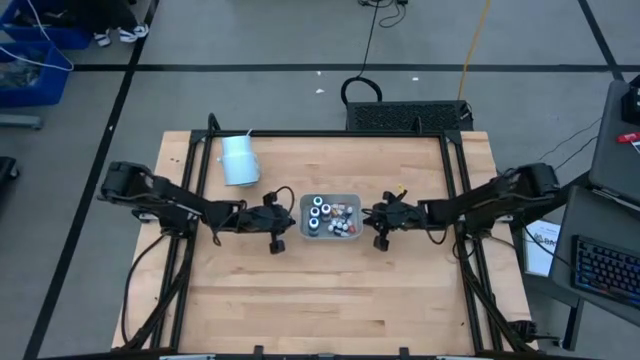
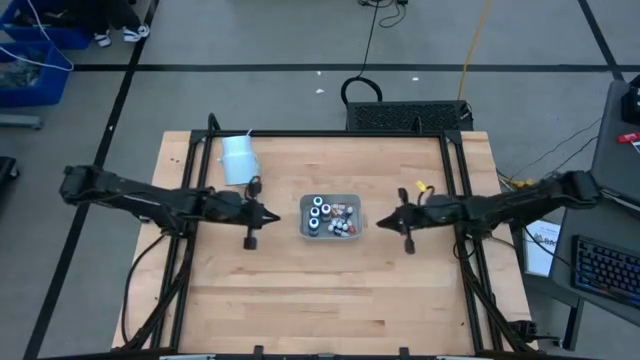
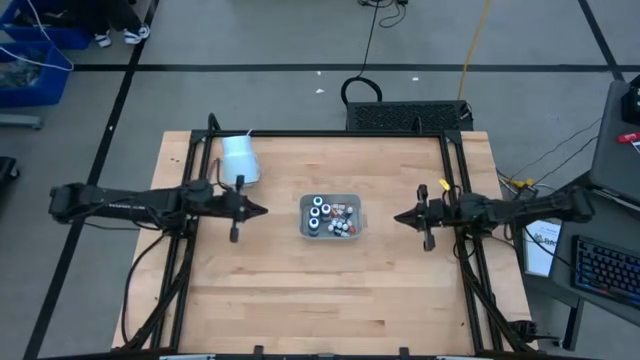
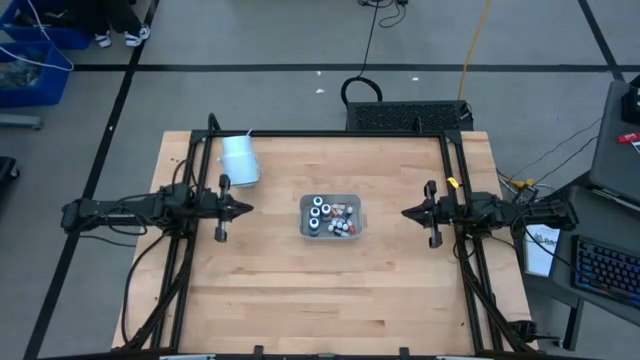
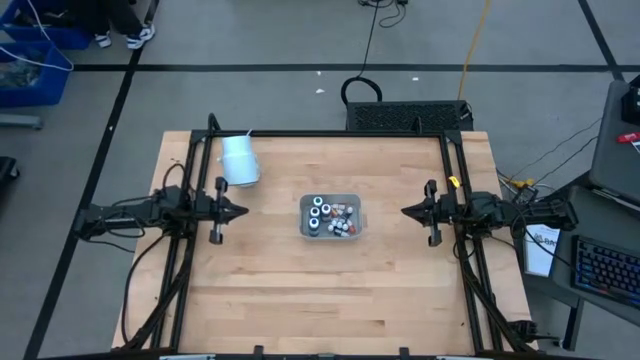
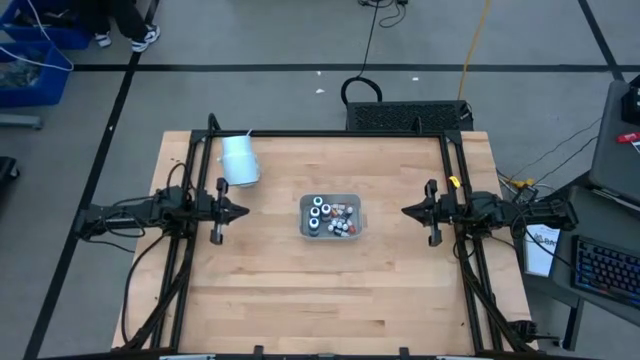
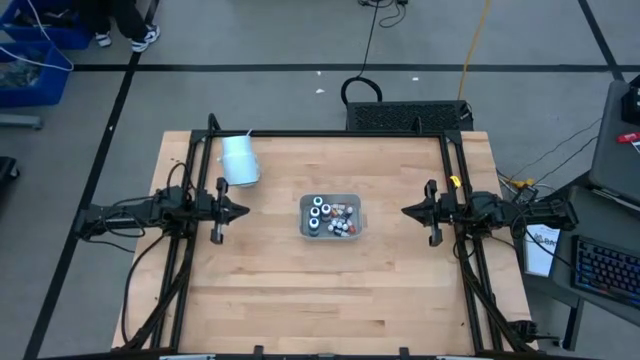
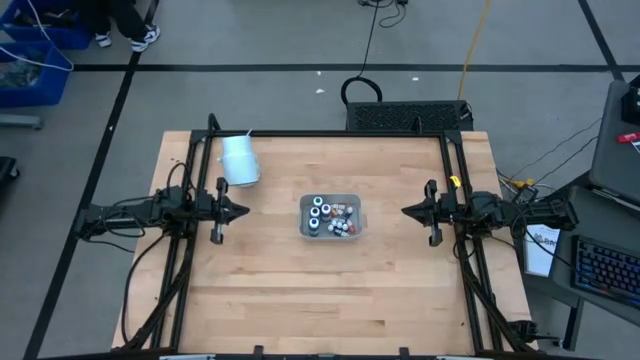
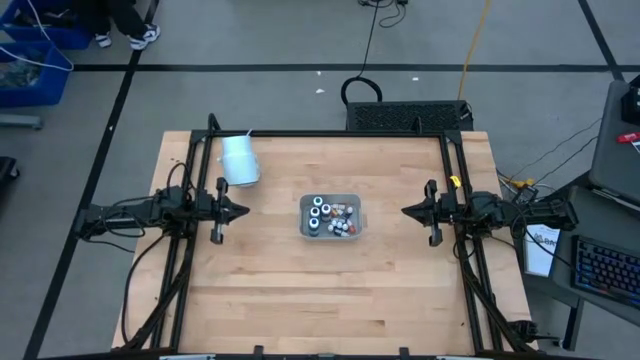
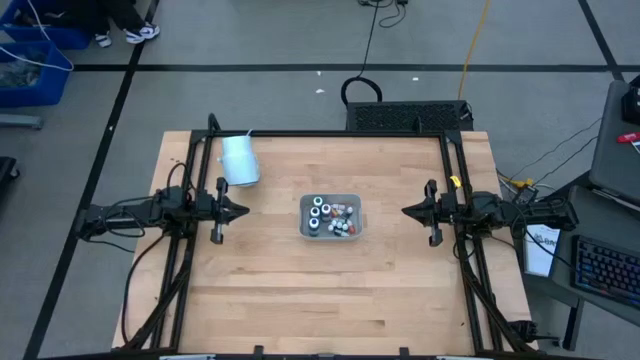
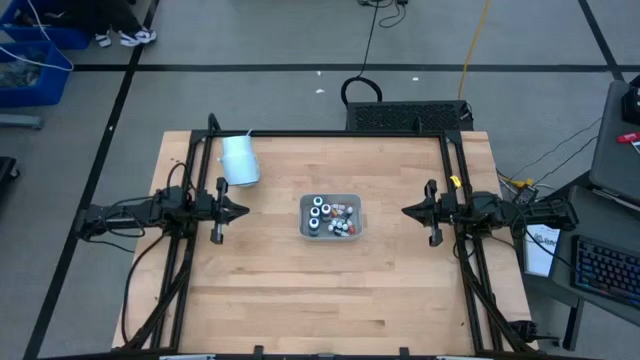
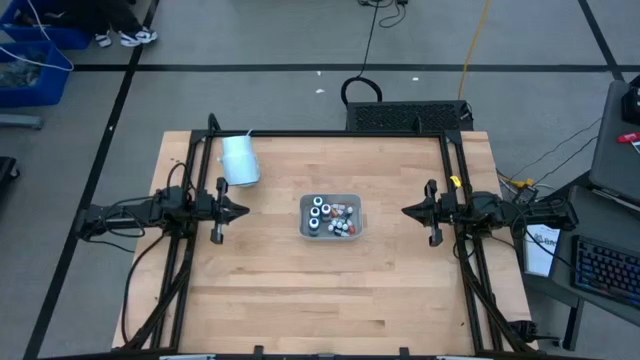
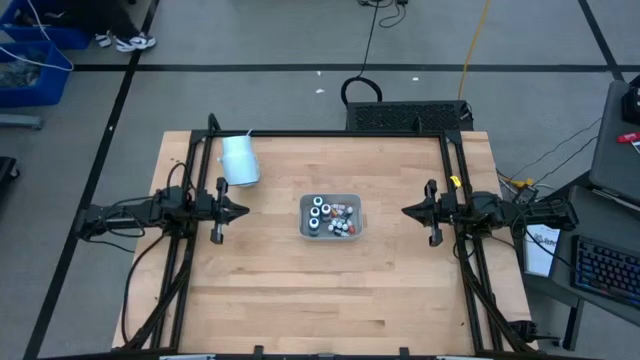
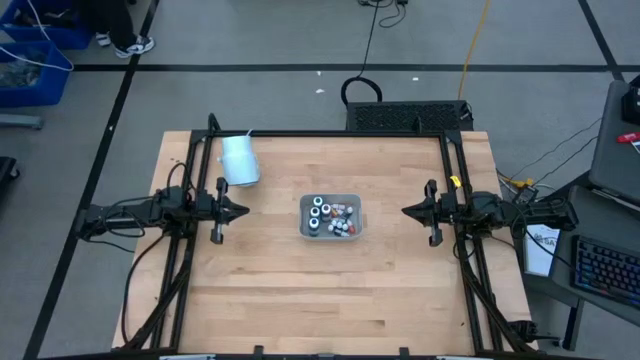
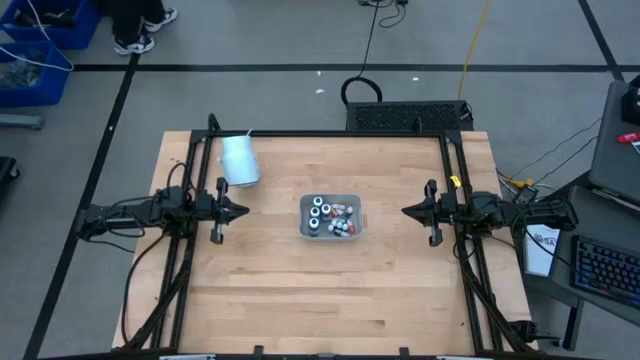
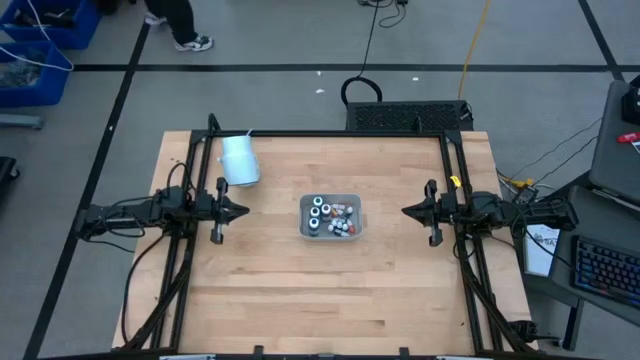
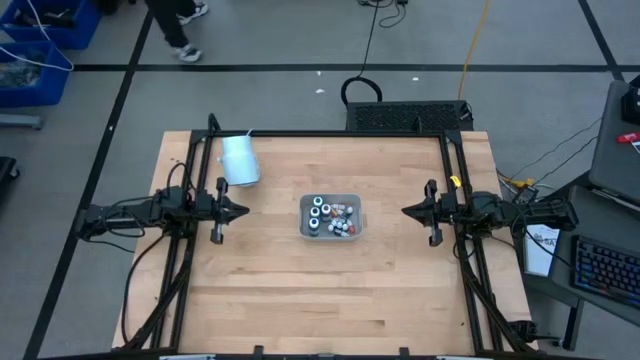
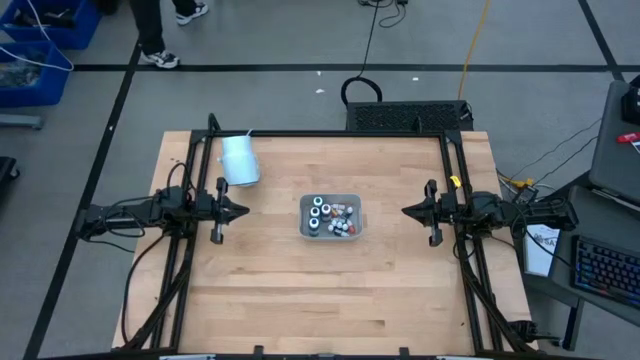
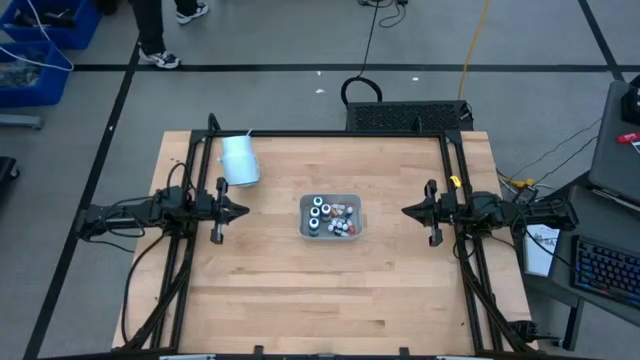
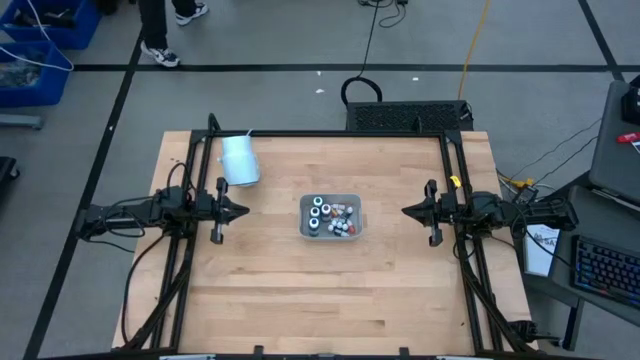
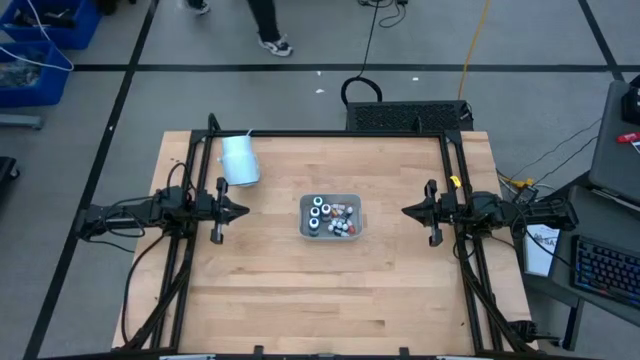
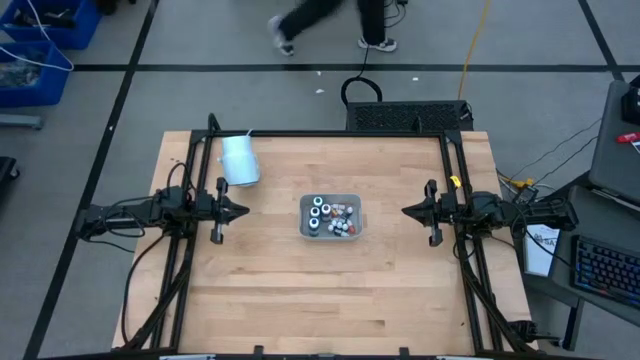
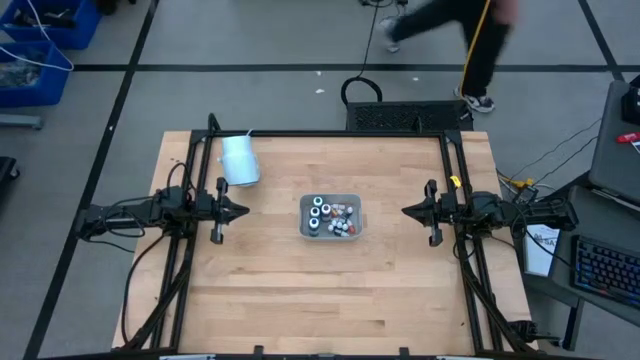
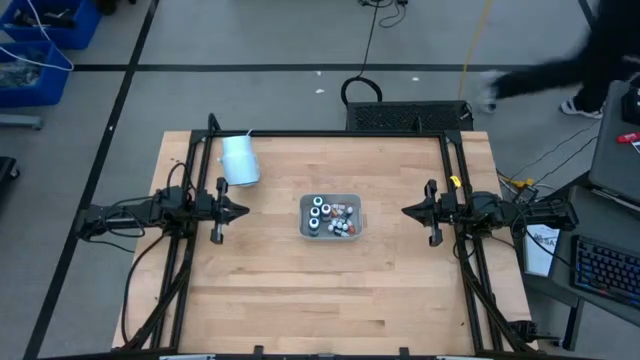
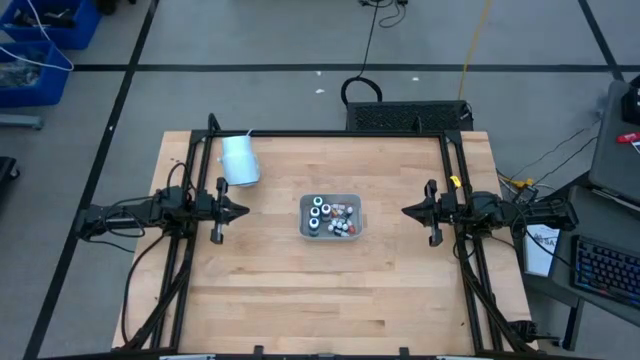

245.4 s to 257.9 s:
Task: Pick & Place food coloring
Return to Home Position

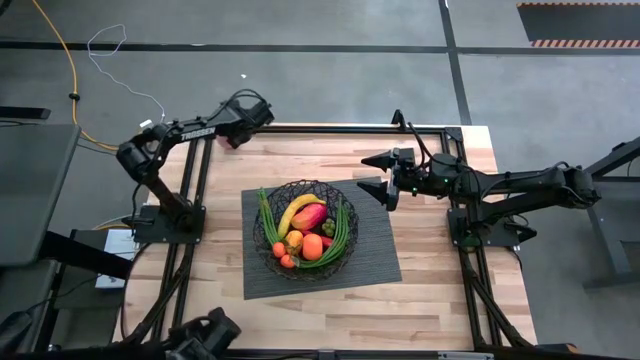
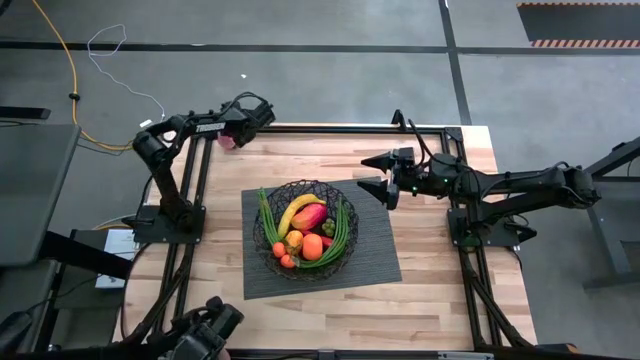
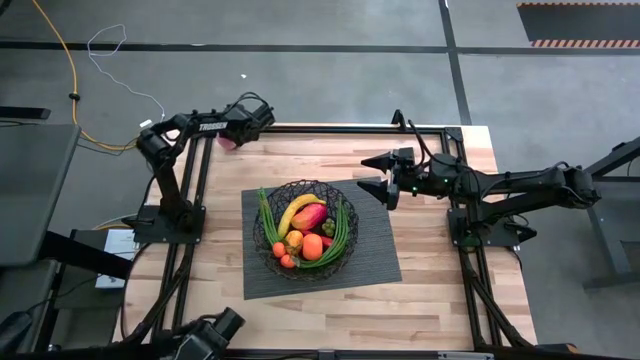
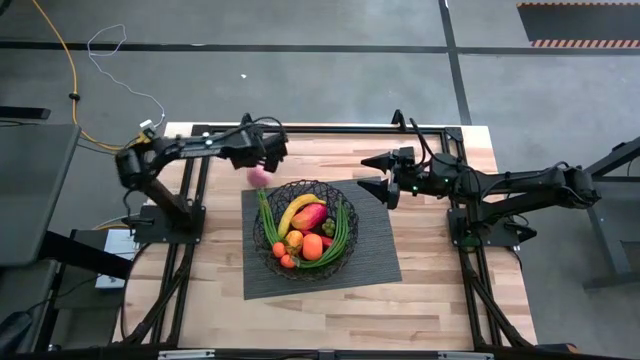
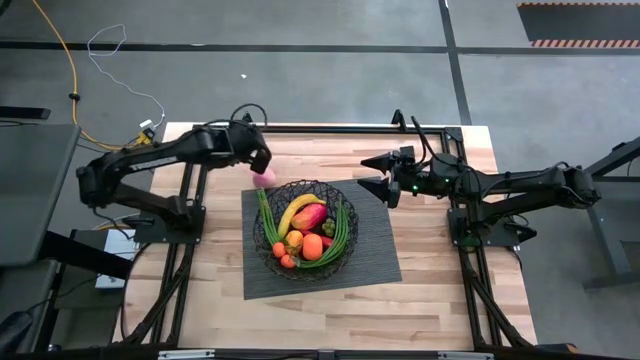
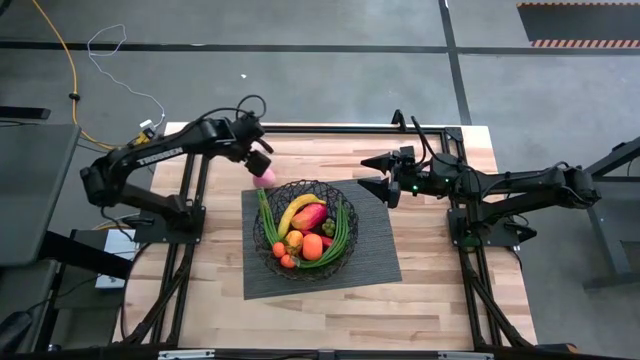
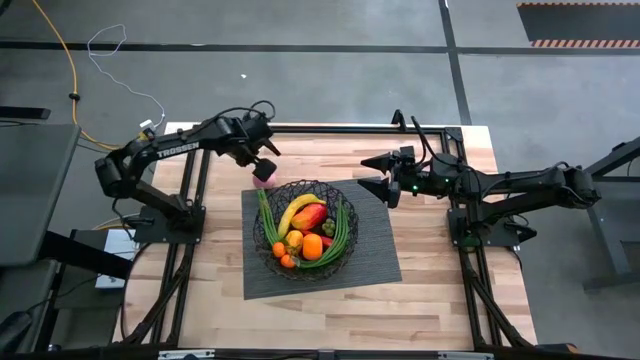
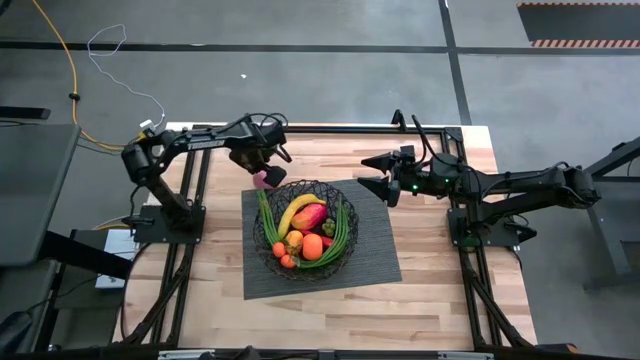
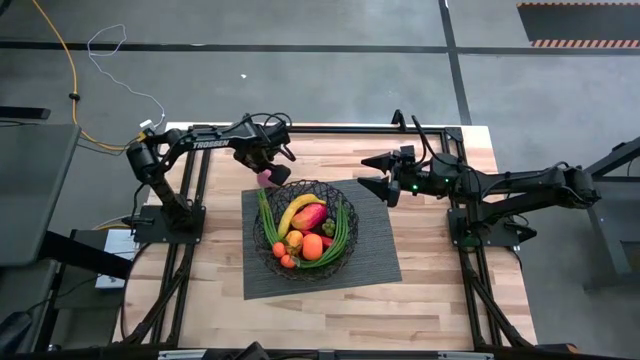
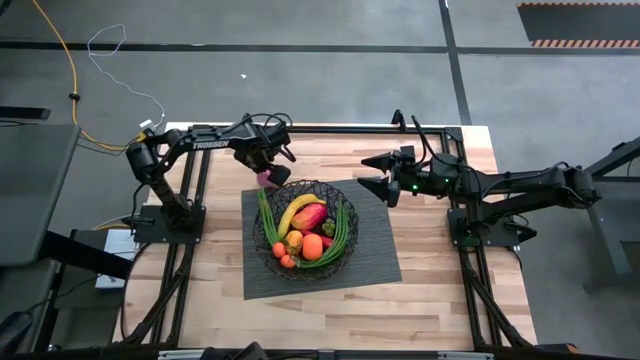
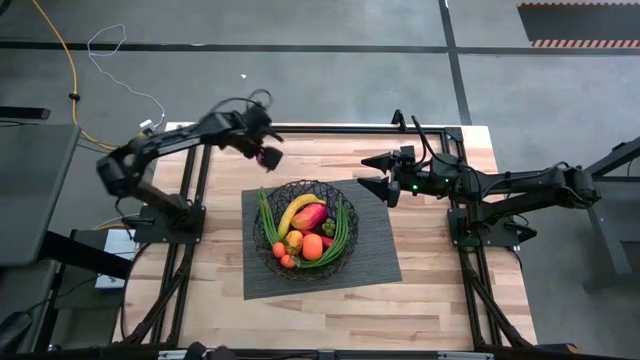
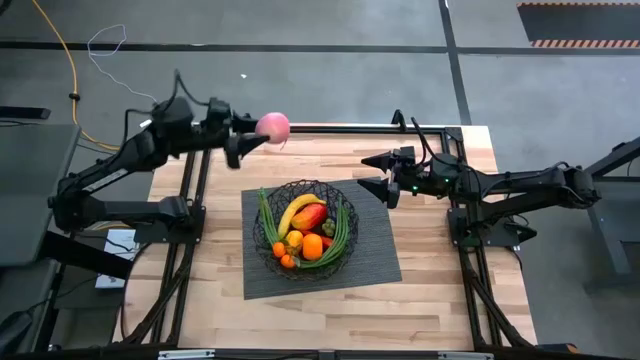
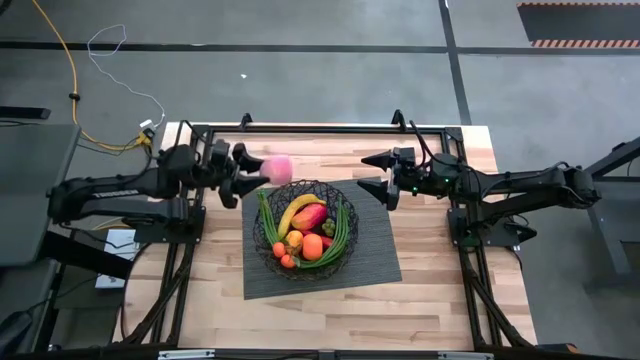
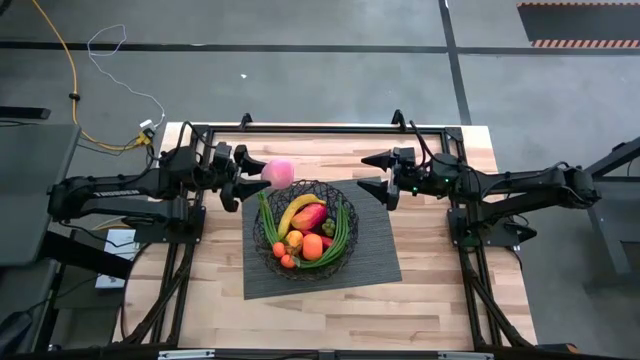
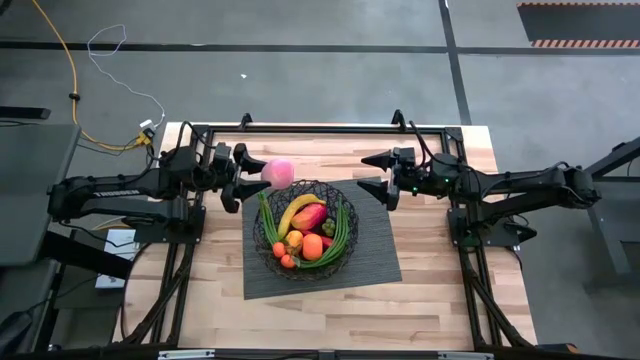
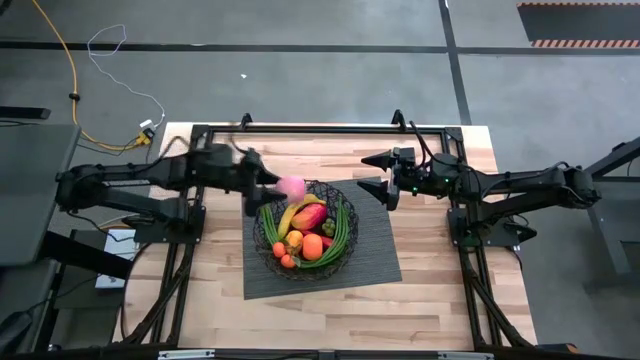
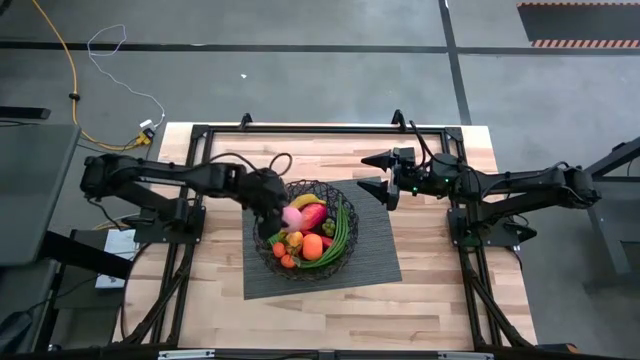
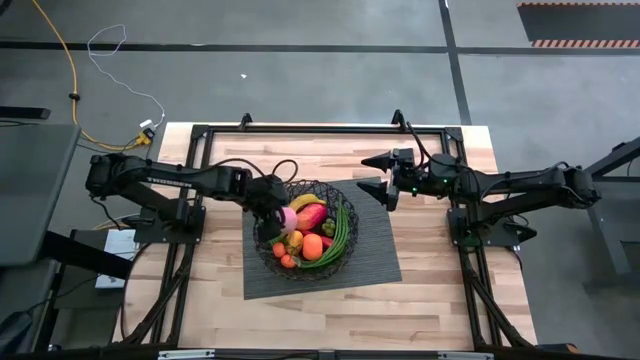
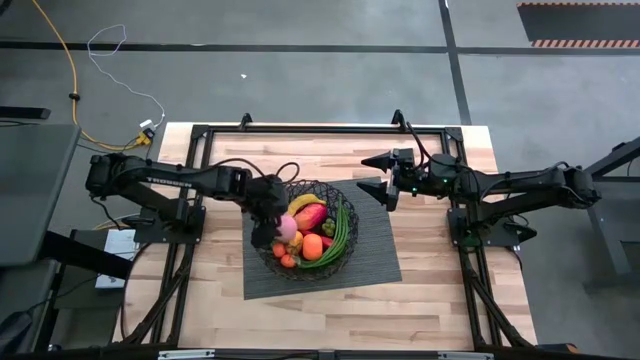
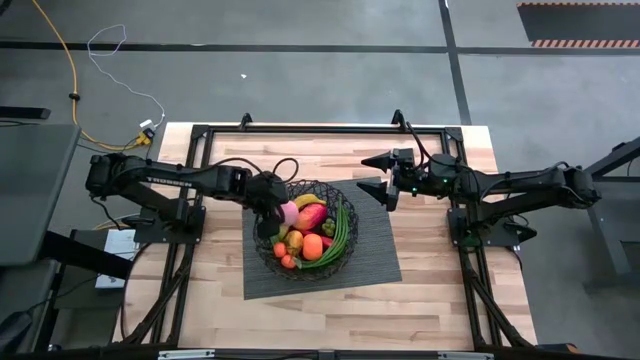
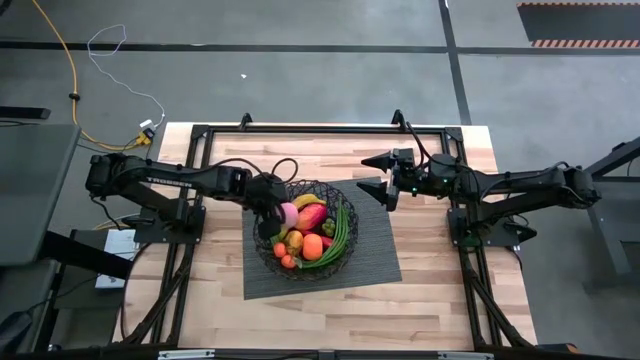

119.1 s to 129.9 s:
Task: Build produce basket
Put the pink peach into the black mesh basket
